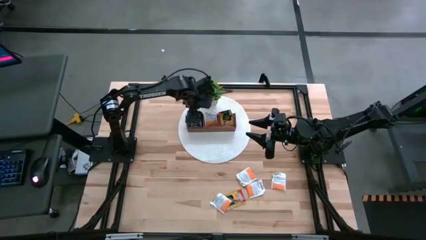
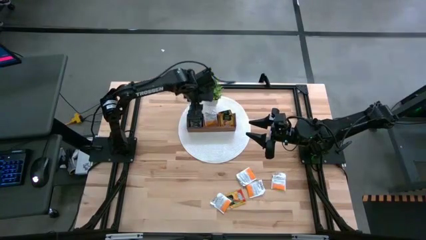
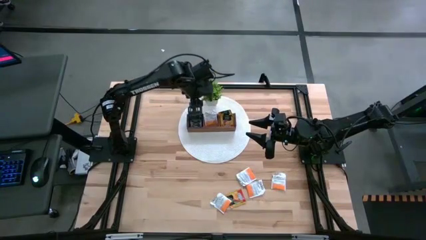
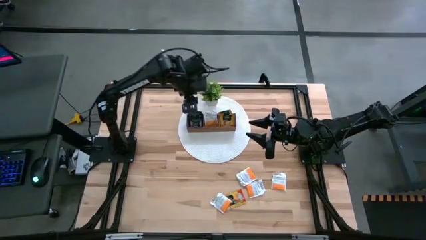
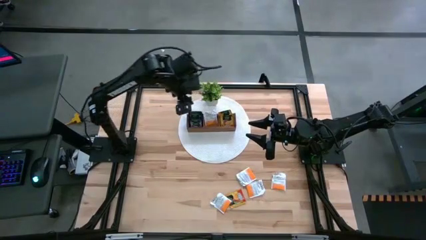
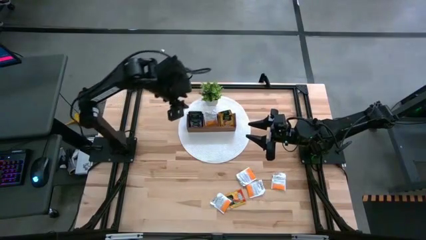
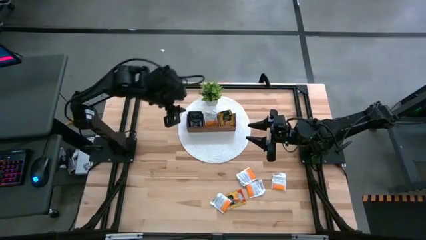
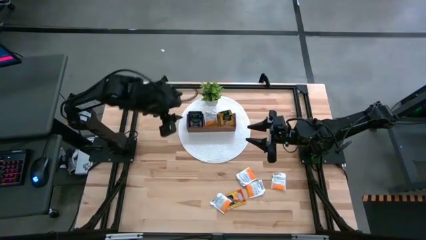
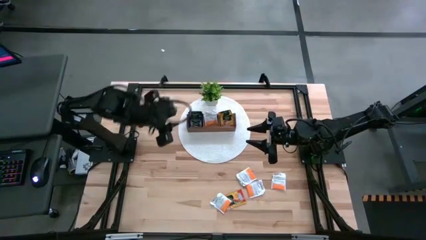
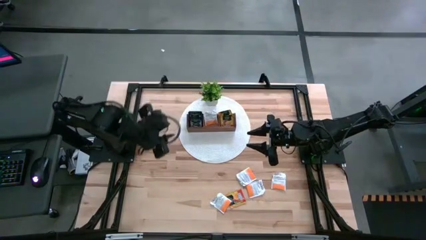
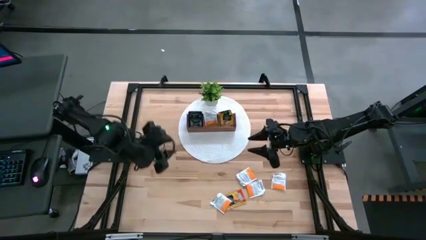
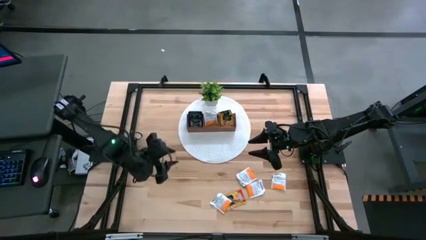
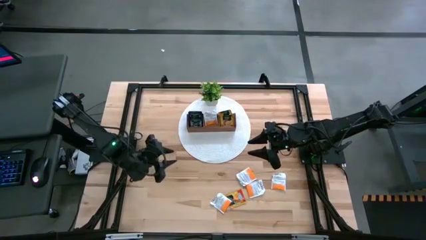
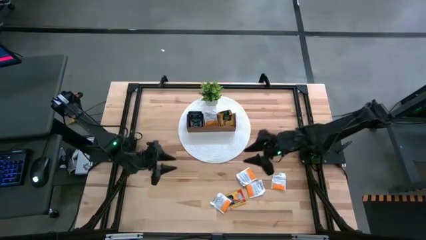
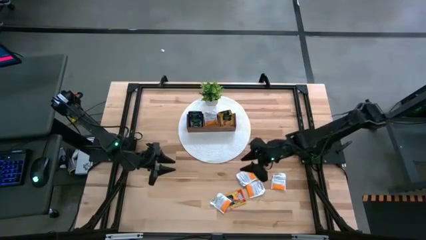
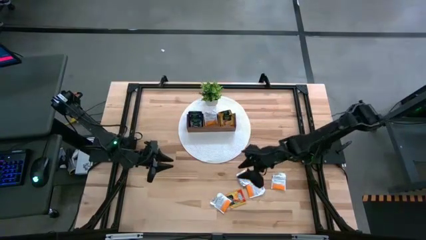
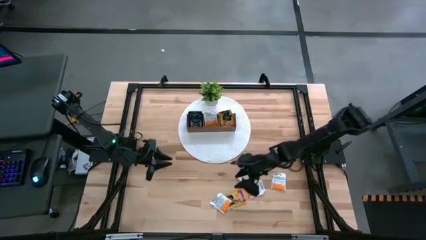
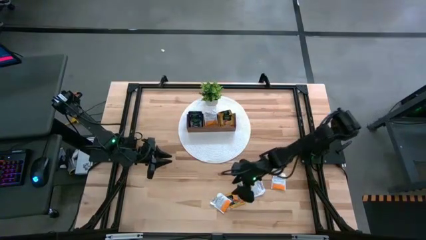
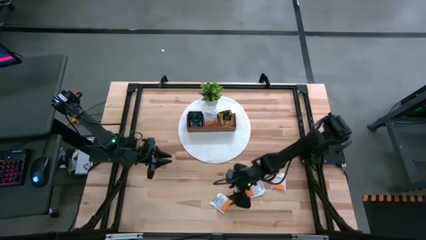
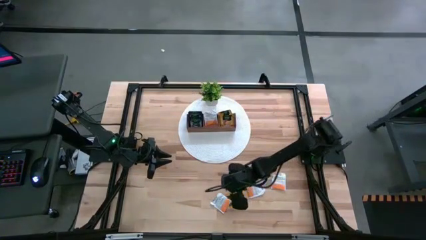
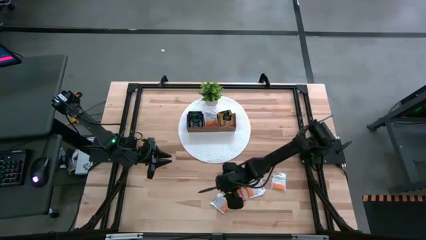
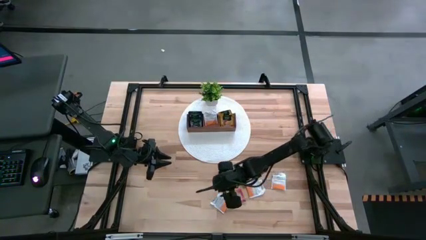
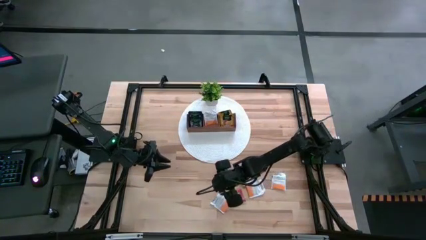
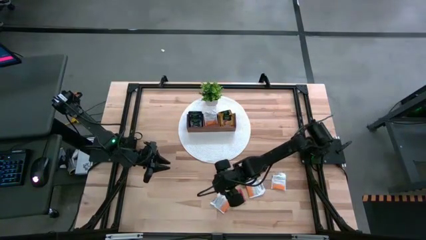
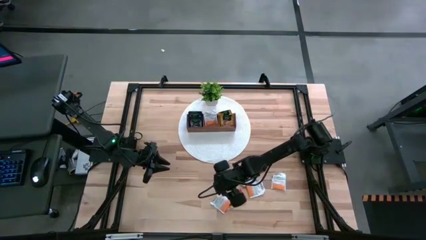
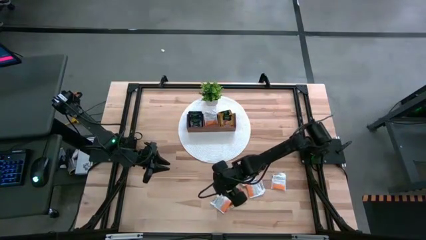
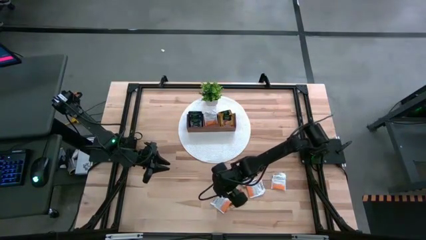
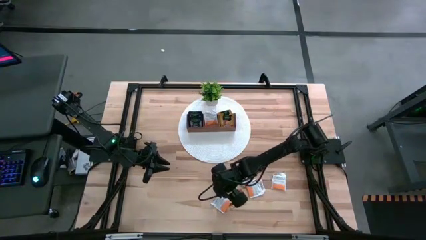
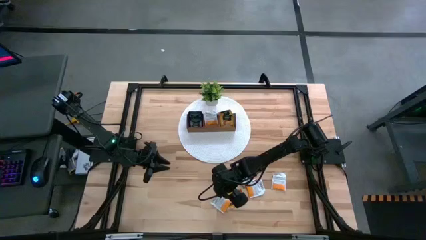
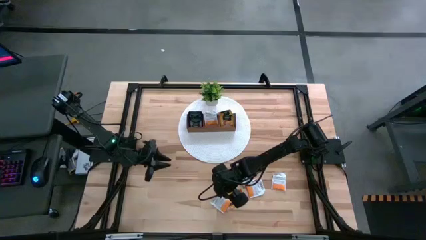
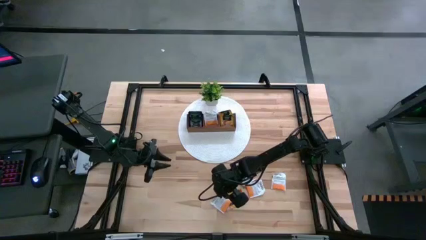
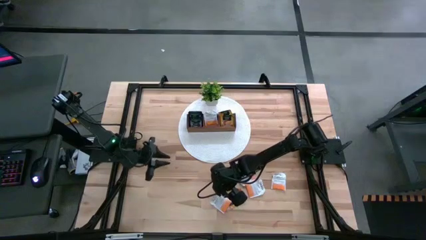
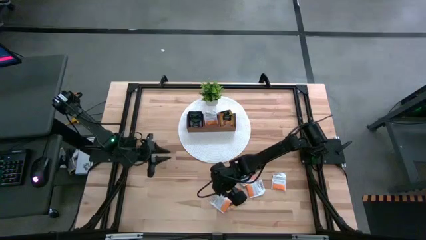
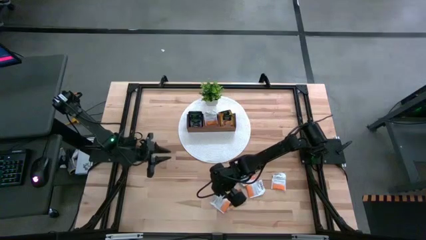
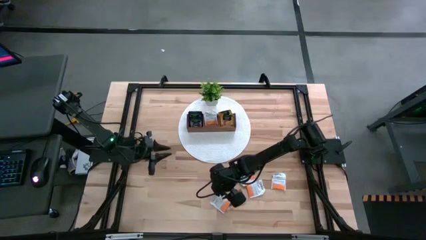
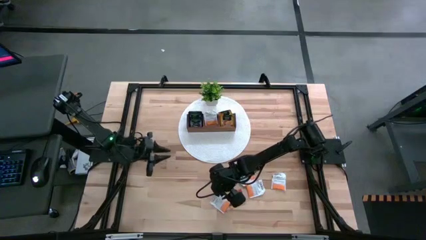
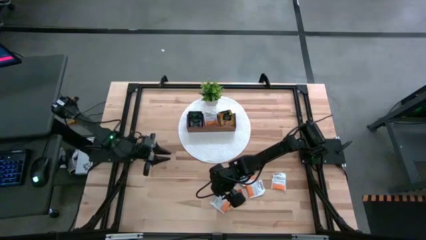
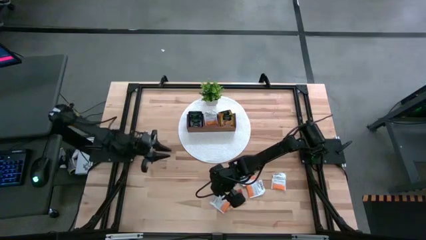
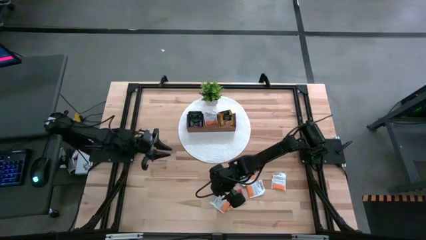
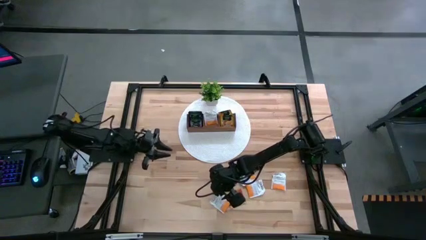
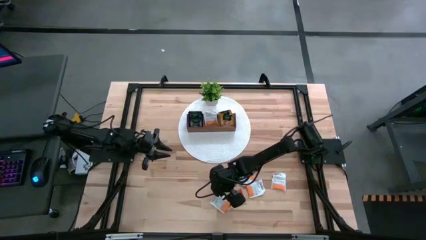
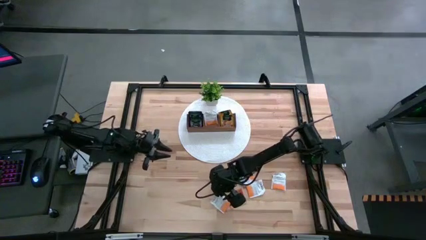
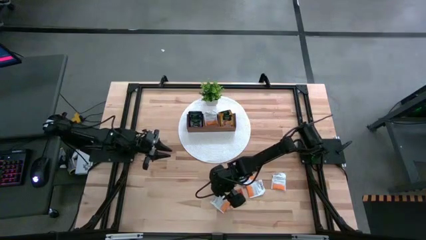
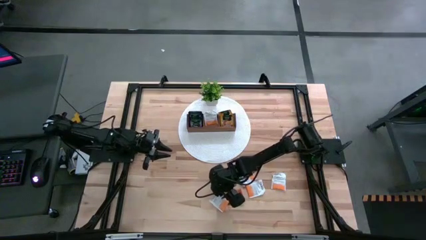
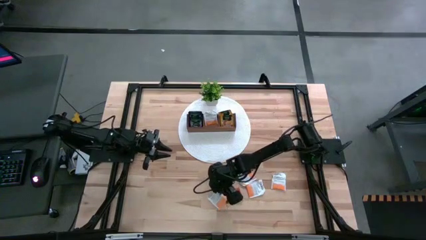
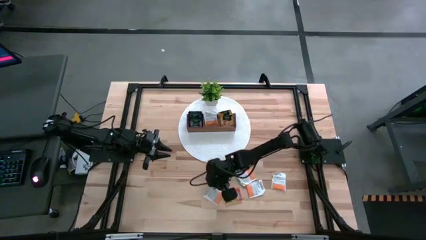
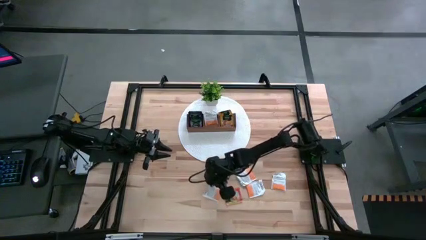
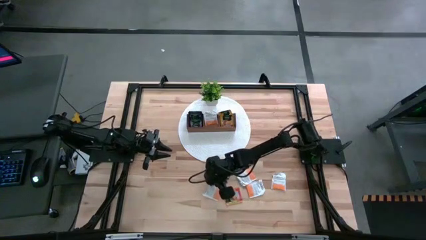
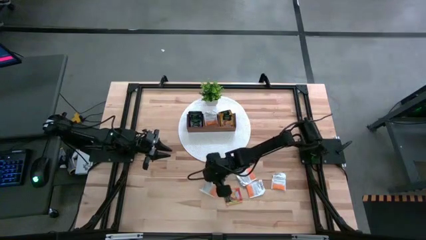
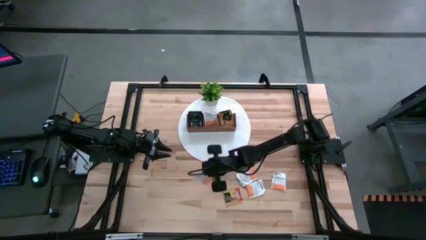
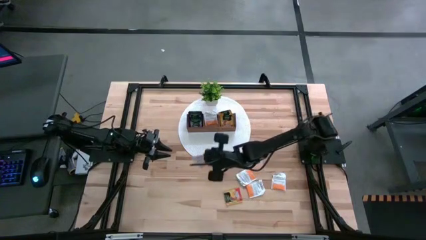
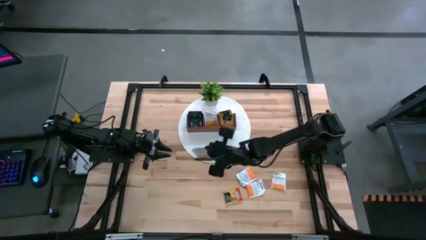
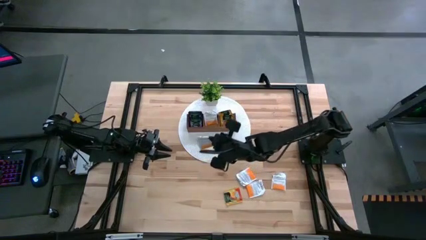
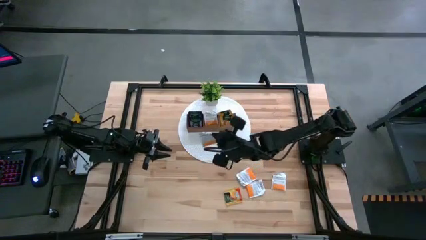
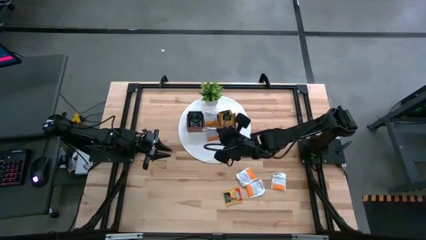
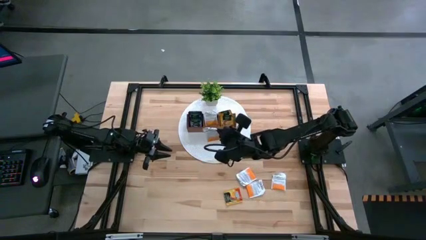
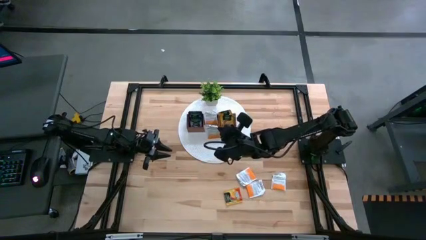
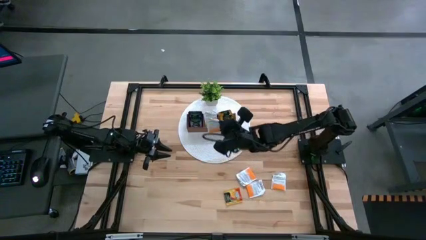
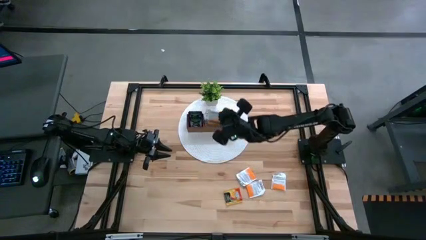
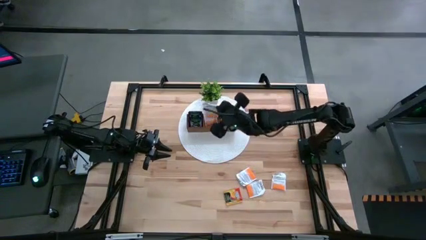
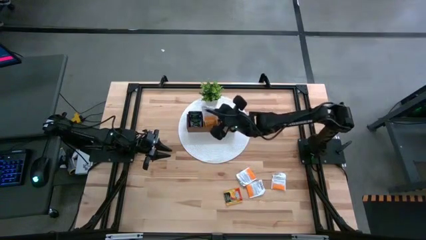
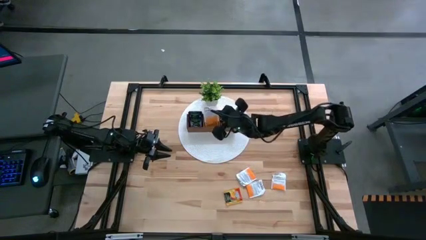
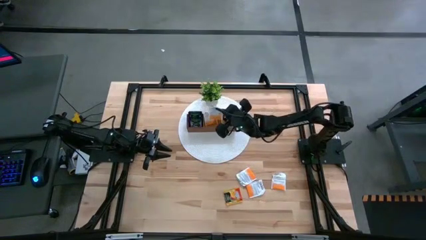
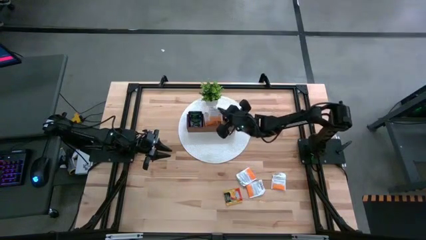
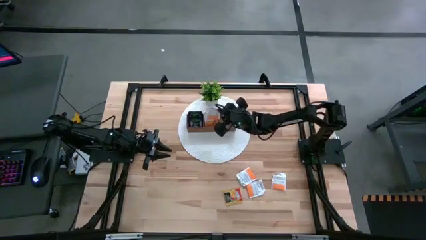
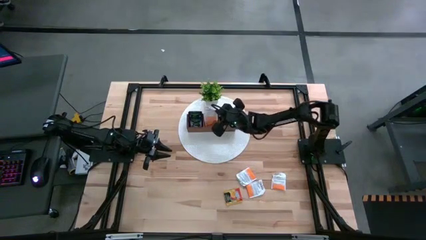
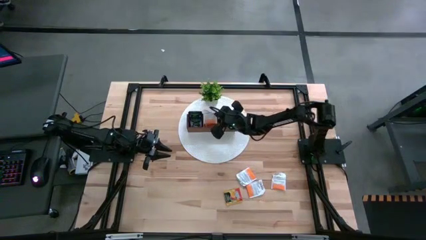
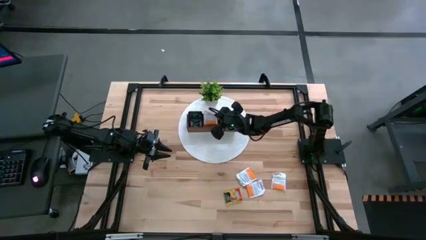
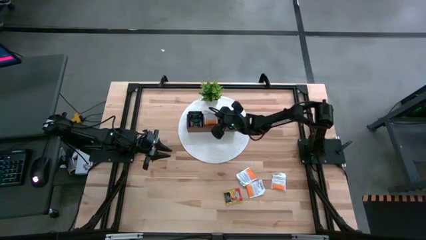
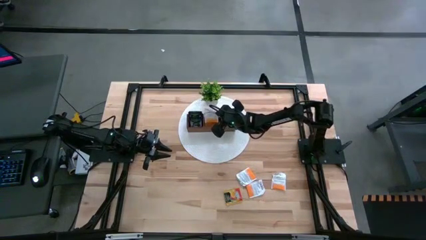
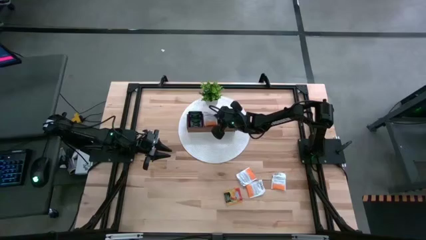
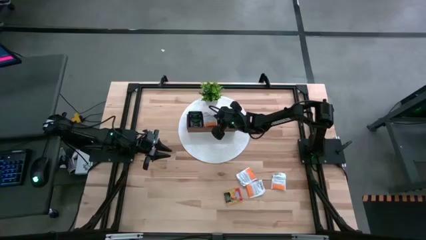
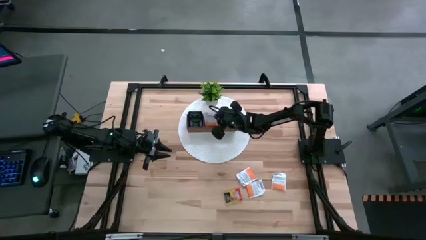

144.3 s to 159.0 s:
Task: Pick & Place Tea
Put the white orange tea bag into the middle section of the wooden organizer

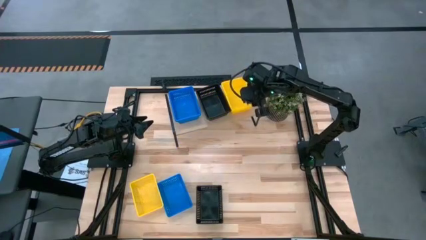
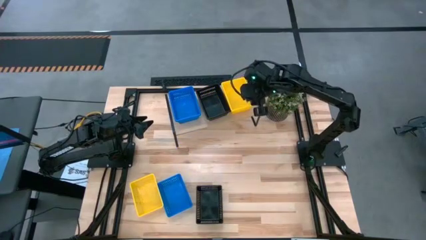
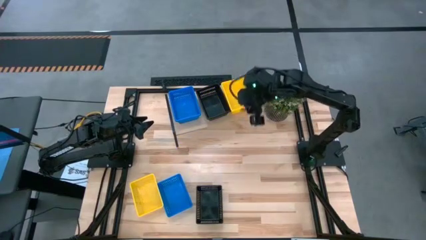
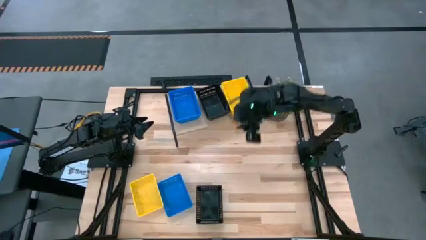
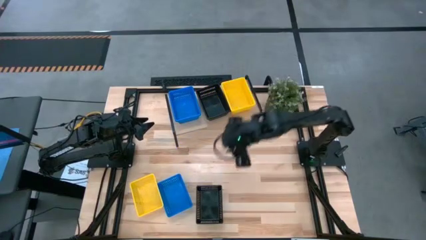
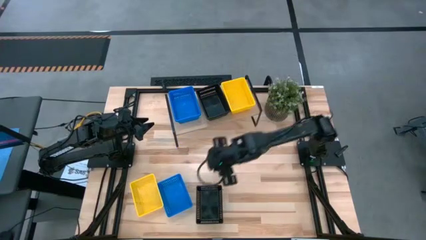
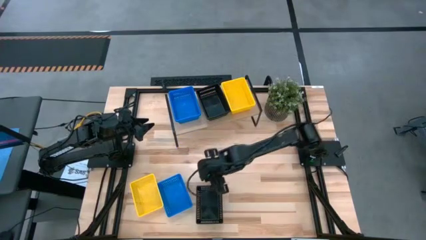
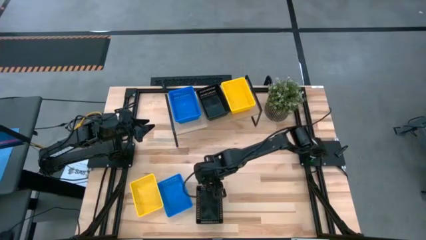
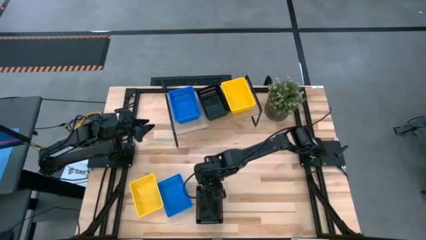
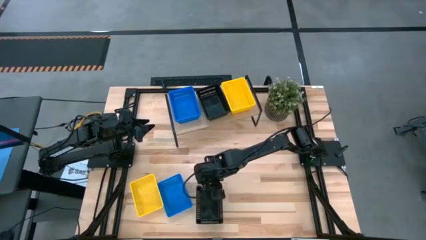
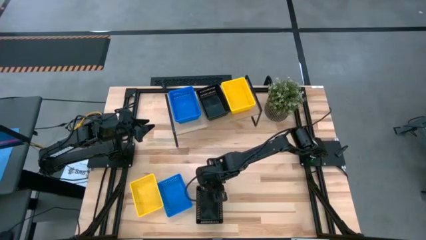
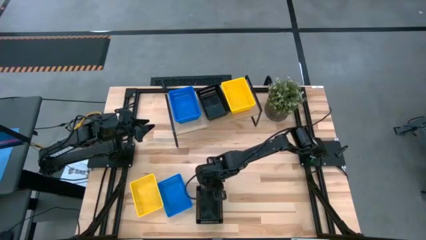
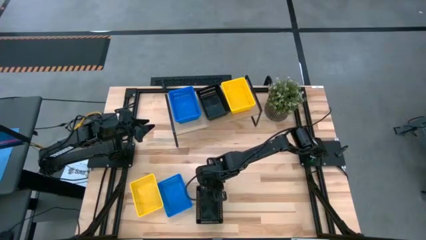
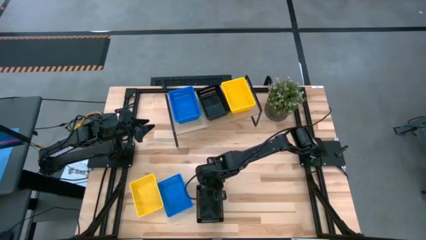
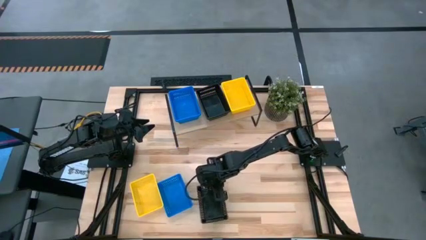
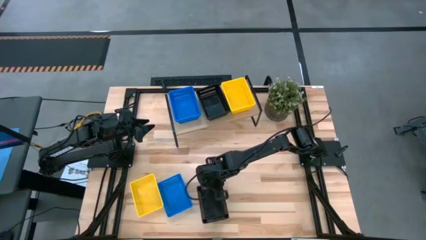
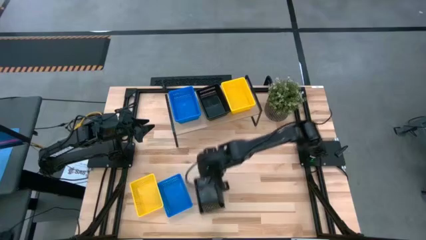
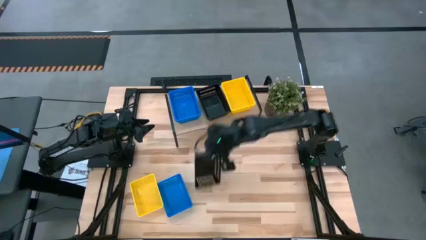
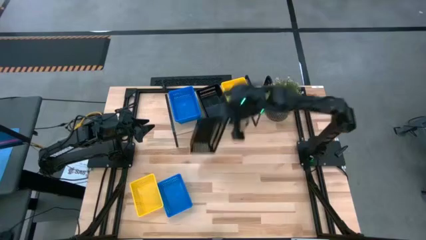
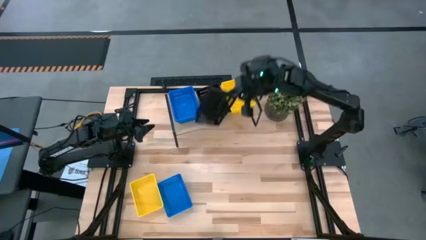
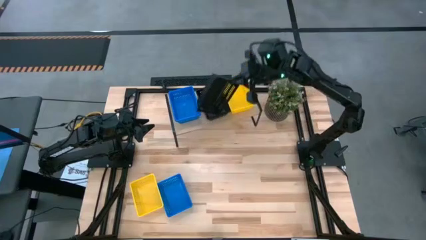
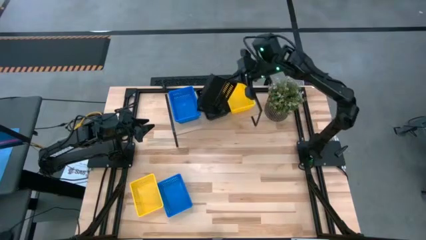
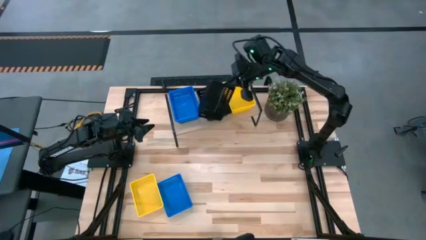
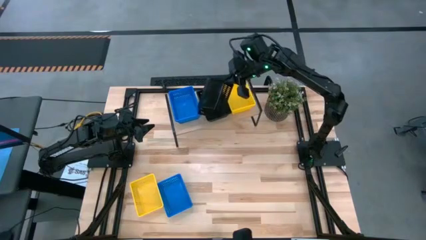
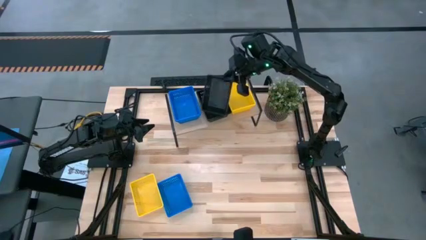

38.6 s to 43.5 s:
Task: Stack baskets on shelf by color
Stack the black bin on the black bins on the shelf
